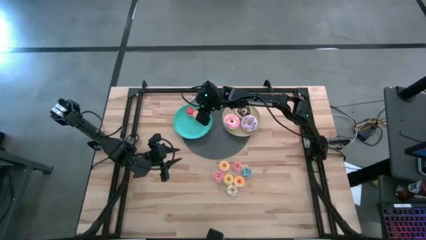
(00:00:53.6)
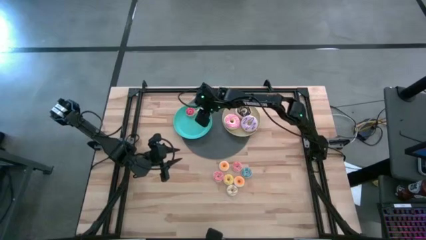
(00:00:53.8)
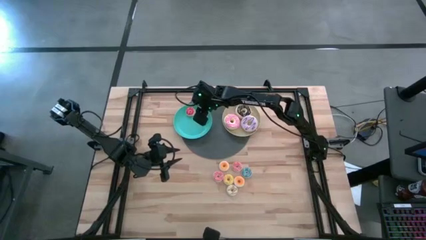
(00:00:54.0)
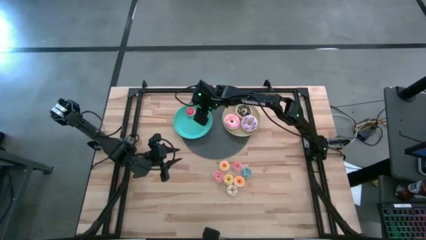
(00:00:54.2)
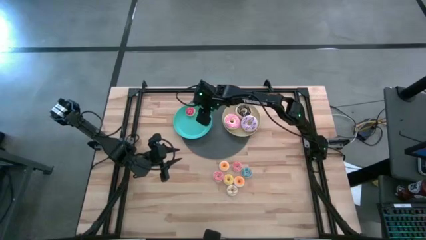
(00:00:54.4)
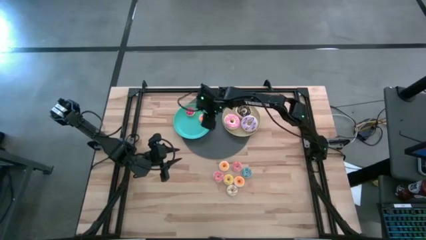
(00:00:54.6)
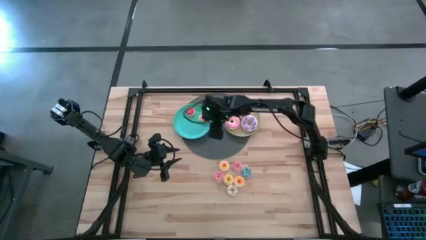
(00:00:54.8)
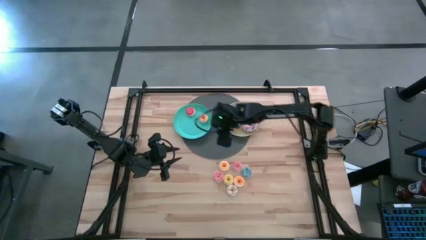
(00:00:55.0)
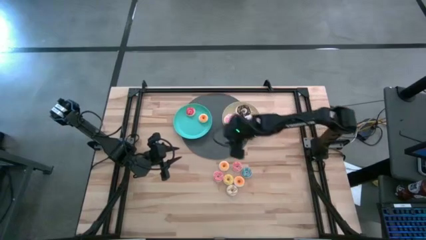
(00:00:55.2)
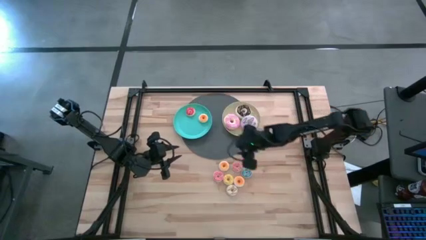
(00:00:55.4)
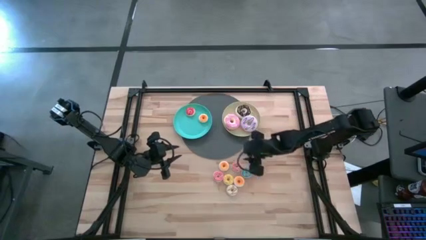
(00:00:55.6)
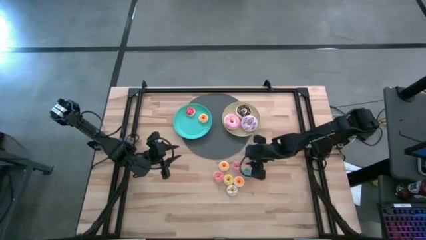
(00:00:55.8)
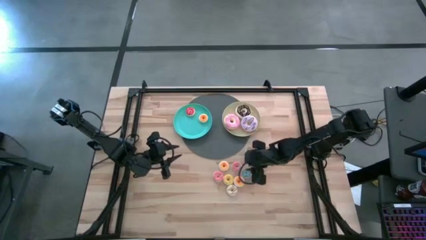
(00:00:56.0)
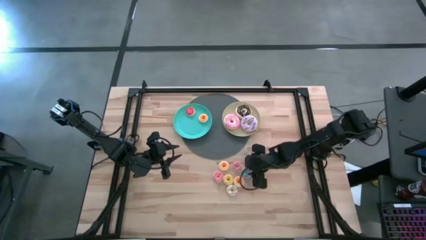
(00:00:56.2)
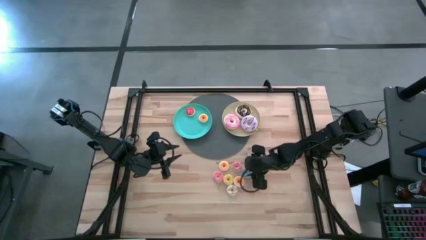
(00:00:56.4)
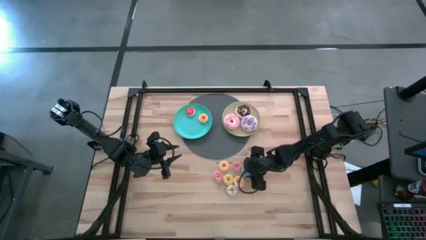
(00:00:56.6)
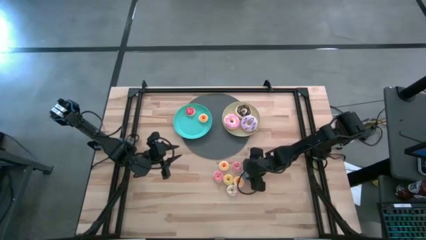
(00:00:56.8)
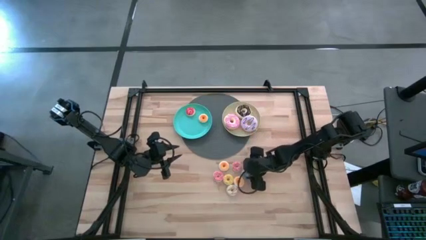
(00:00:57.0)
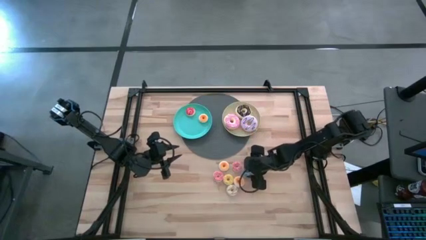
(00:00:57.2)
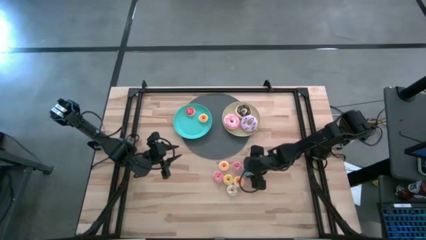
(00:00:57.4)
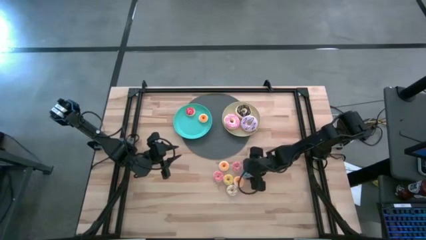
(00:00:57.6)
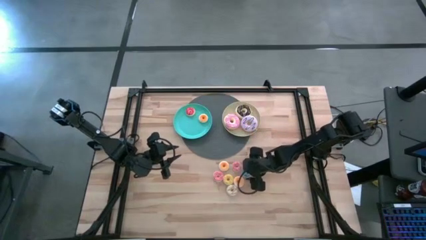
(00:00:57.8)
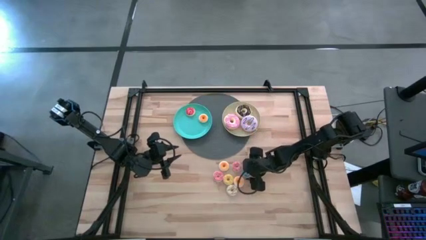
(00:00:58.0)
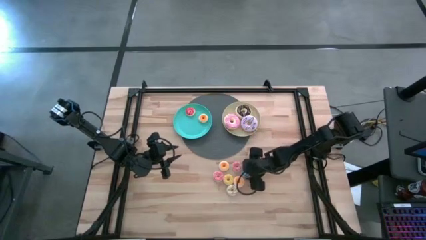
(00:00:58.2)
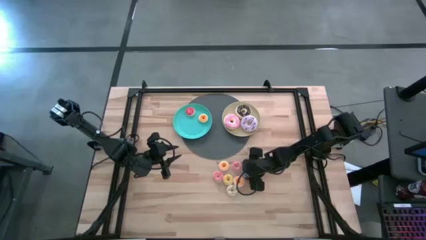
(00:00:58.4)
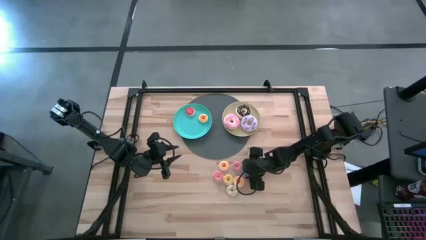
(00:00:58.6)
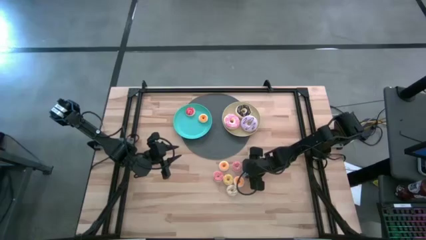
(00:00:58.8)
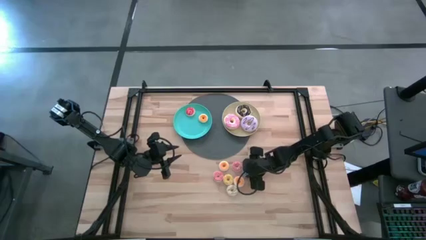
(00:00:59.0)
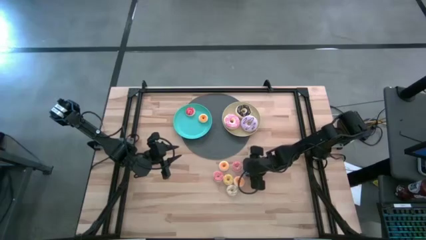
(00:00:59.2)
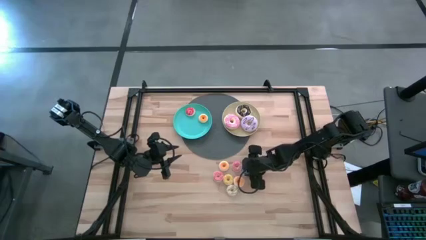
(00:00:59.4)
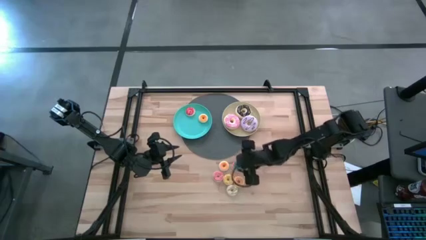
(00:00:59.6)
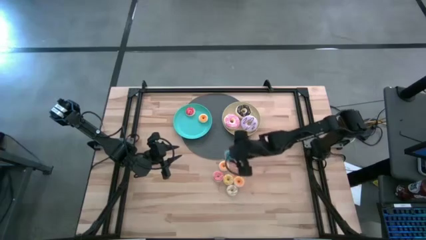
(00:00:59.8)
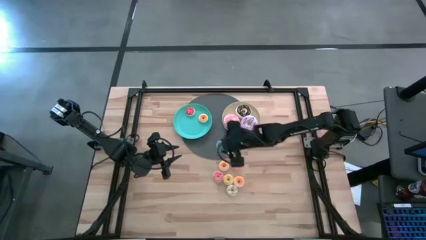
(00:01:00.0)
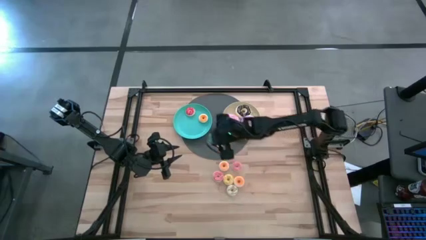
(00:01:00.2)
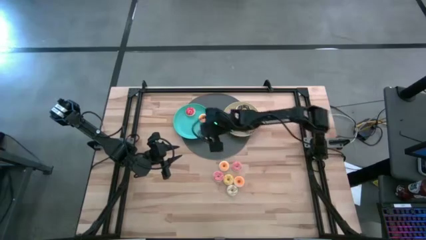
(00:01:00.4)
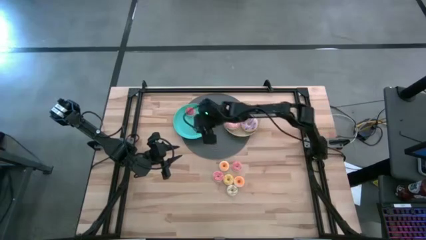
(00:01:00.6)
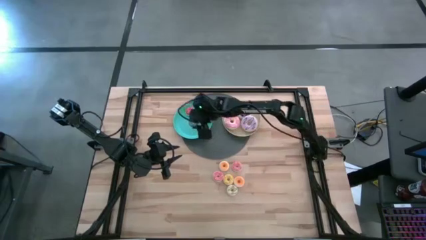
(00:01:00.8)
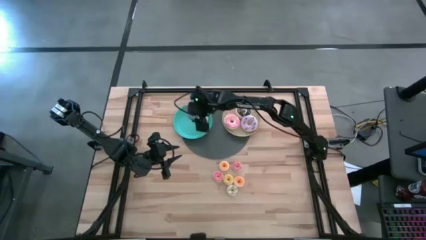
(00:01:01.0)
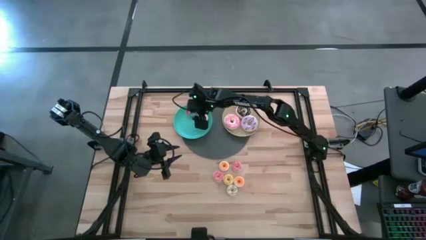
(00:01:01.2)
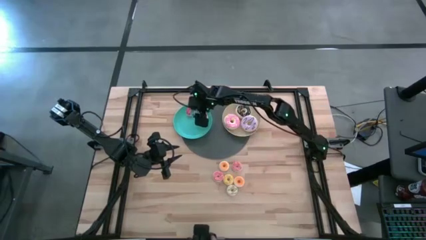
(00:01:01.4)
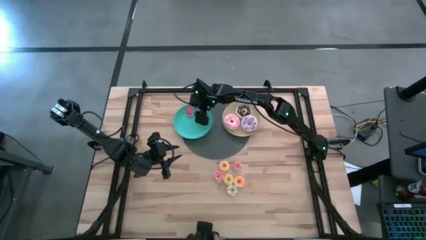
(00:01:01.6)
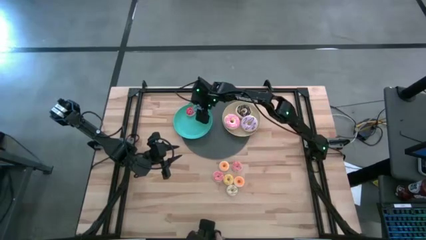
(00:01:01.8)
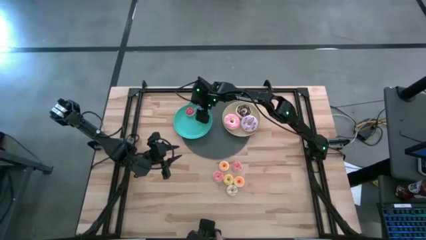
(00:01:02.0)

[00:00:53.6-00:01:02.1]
Task: Pick & Place donuts
Put the small blue donut on the green plate

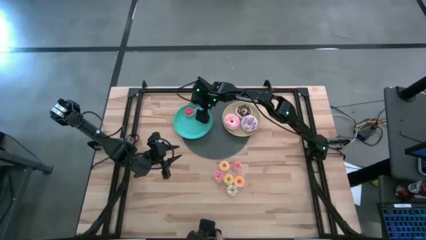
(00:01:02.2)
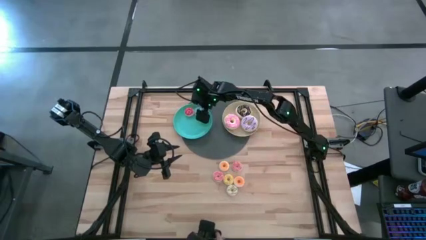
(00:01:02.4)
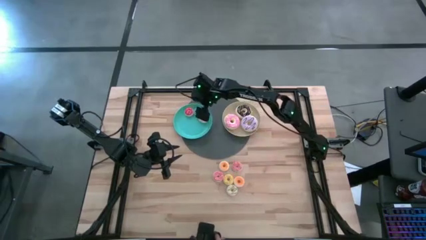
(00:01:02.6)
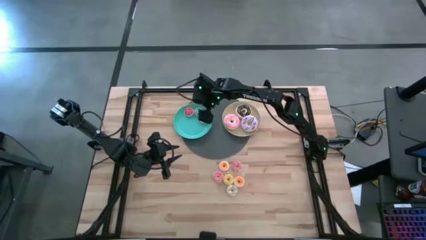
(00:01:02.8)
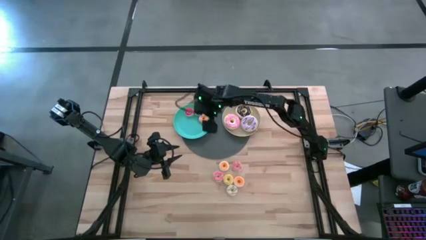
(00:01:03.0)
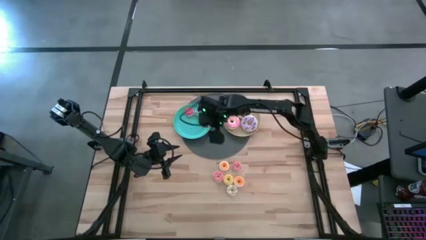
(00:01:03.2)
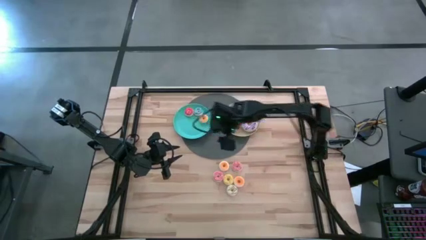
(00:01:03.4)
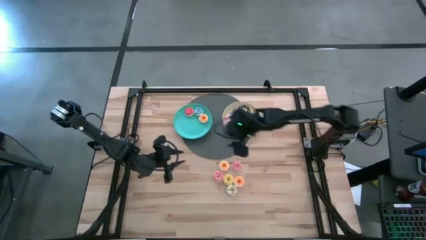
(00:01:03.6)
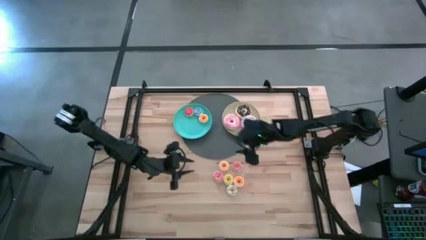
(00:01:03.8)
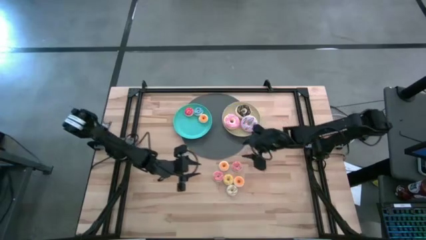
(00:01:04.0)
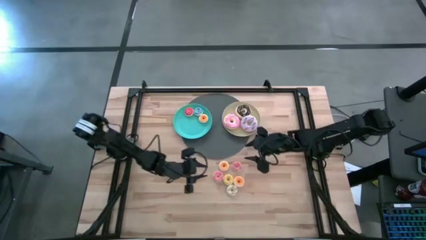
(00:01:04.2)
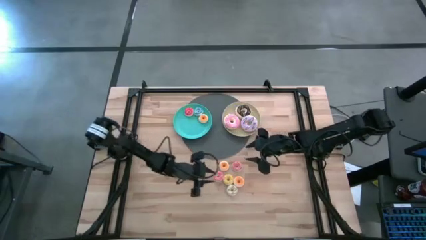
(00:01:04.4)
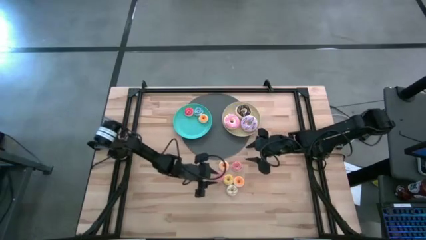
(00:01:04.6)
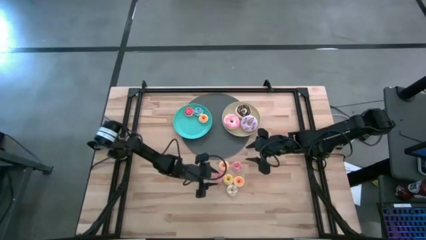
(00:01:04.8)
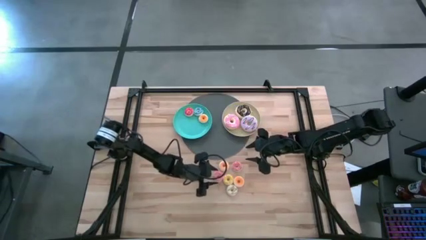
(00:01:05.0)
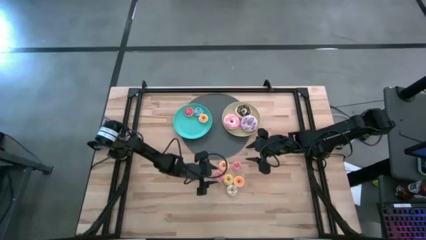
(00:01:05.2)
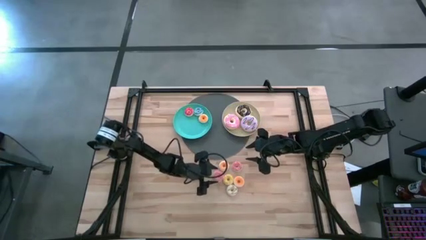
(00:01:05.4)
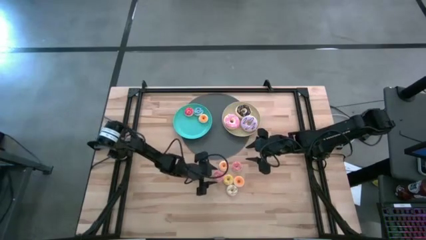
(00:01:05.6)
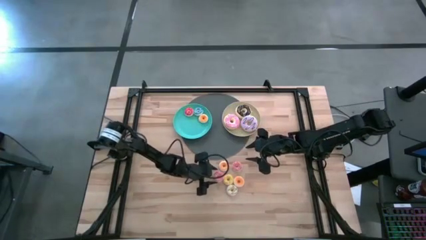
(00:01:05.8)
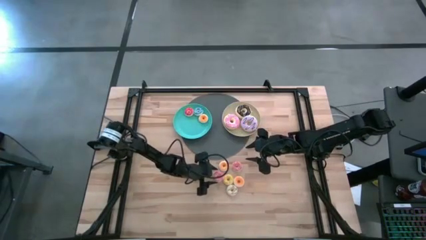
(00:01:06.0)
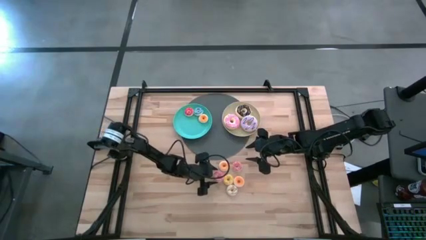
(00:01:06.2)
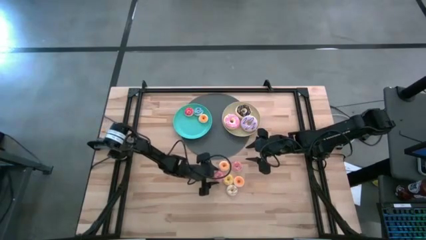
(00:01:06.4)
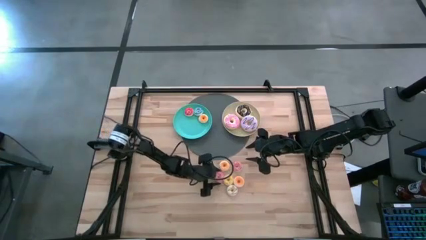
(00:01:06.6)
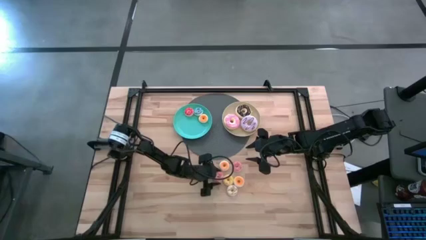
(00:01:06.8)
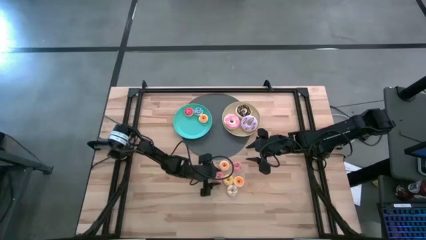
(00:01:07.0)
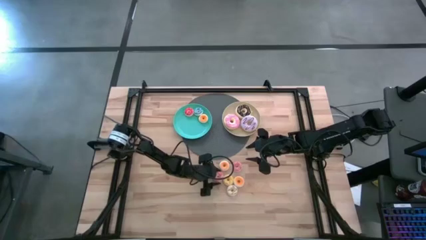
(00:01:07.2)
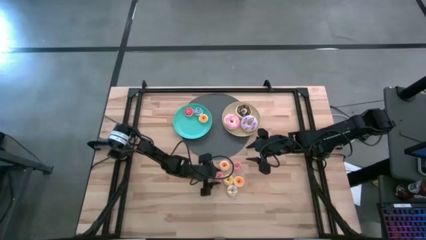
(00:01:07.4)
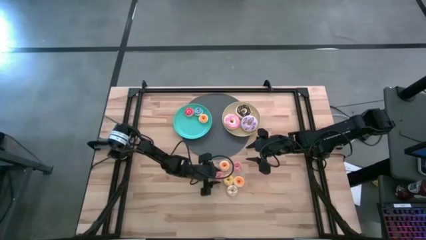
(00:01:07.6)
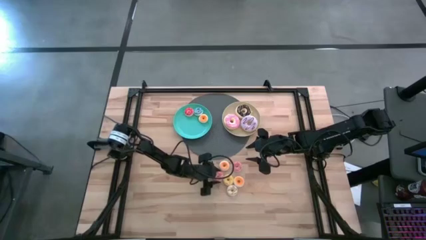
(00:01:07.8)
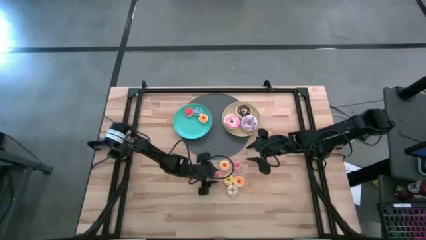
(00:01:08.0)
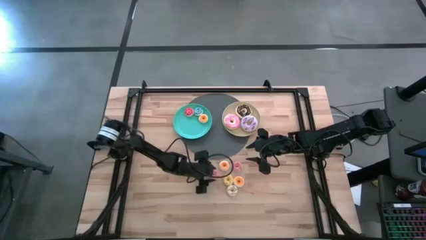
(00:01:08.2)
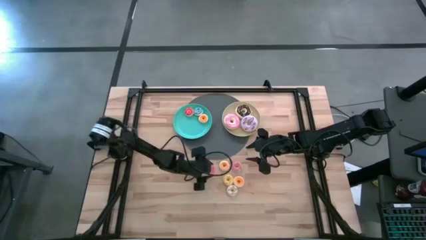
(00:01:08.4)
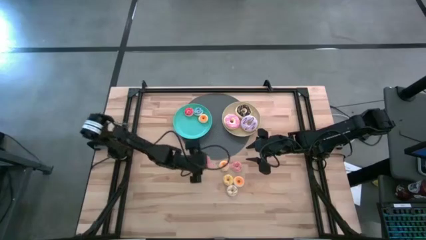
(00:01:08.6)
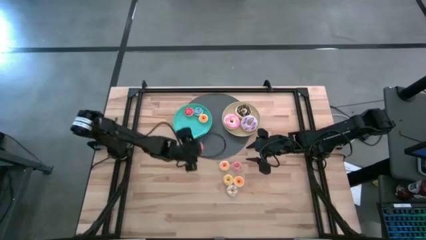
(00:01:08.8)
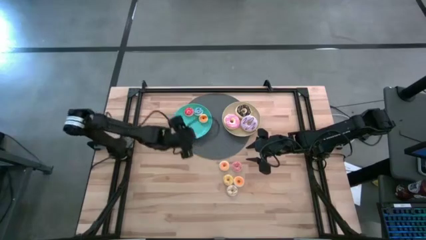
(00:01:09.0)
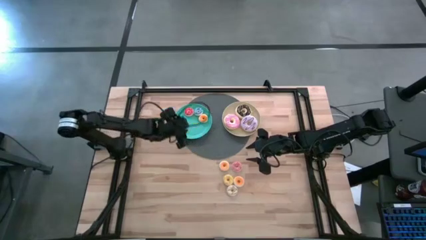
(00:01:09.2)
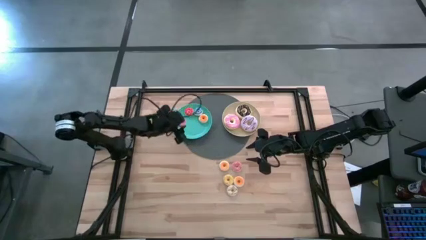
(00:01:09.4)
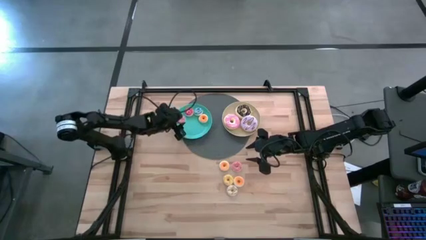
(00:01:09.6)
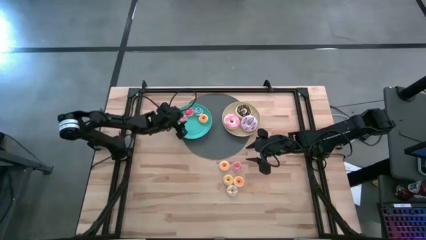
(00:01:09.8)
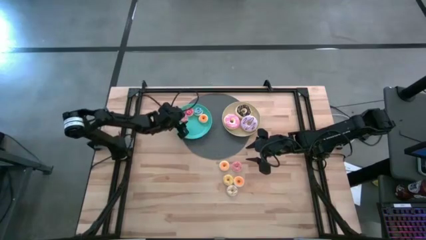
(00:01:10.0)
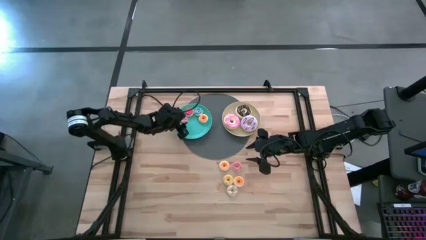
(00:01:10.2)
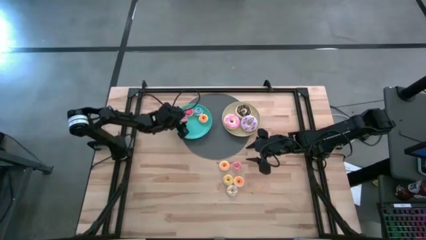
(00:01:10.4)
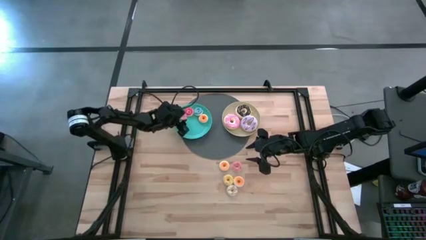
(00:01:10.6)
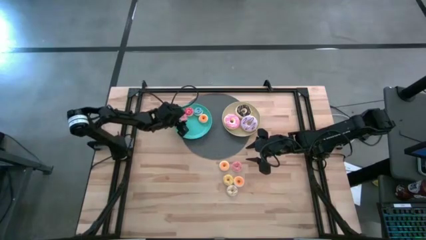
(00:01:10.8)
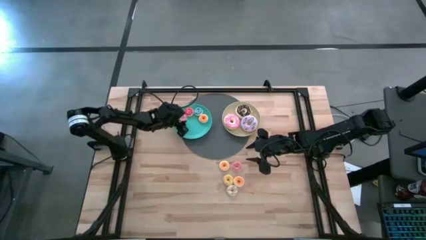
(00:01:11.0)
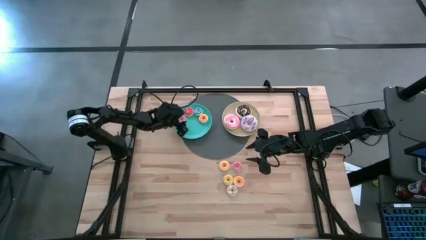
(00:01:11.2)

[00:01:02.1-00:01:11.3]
Put the small left pink donut on the green plate
